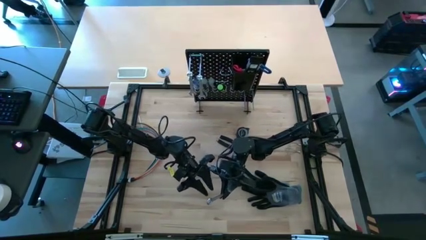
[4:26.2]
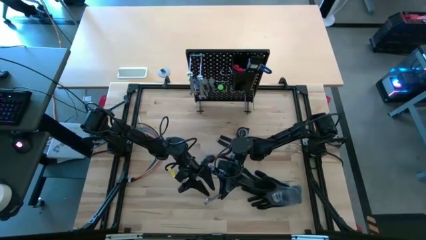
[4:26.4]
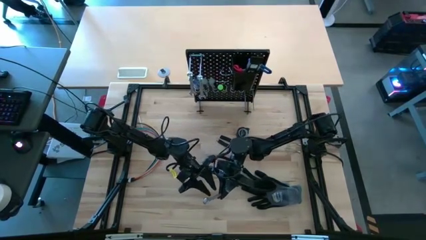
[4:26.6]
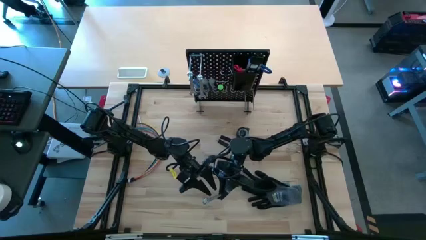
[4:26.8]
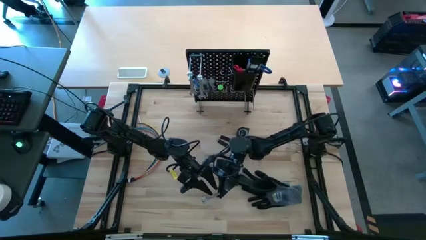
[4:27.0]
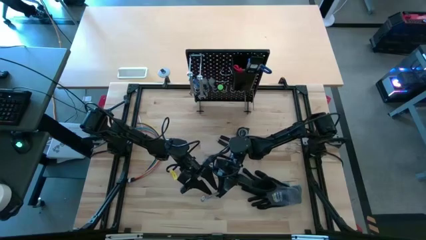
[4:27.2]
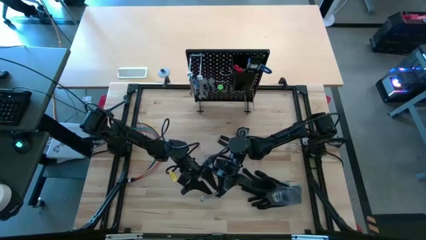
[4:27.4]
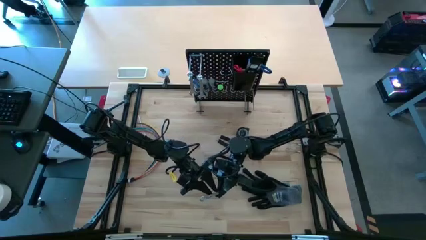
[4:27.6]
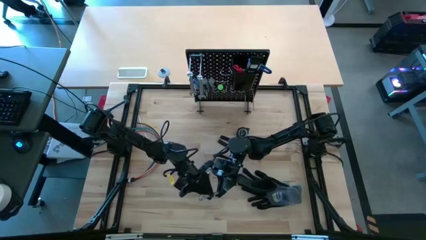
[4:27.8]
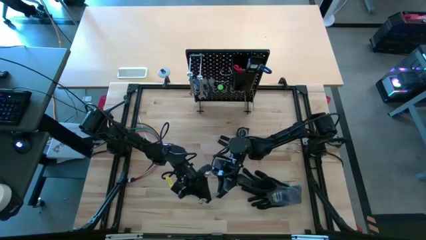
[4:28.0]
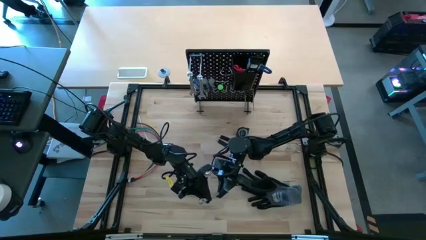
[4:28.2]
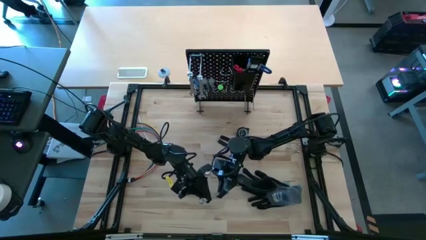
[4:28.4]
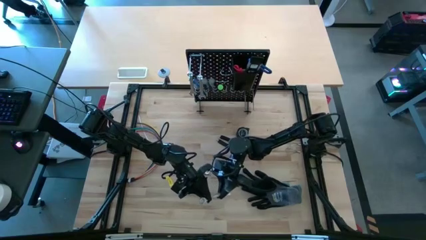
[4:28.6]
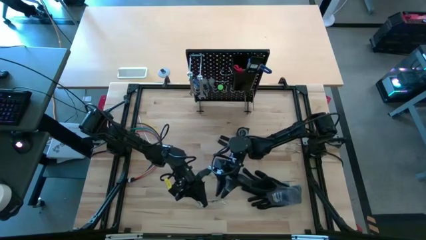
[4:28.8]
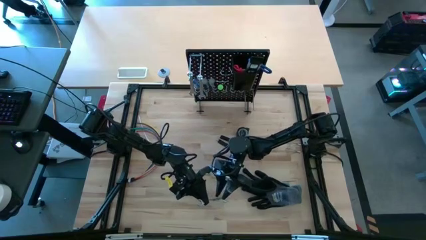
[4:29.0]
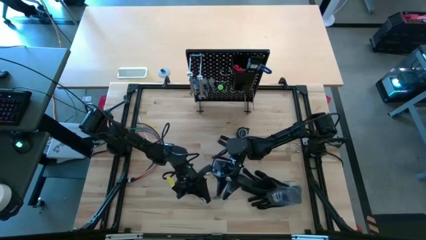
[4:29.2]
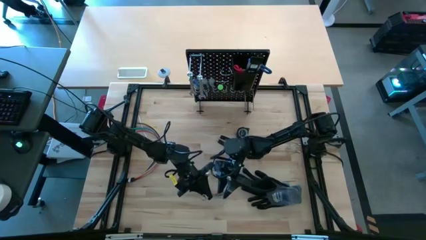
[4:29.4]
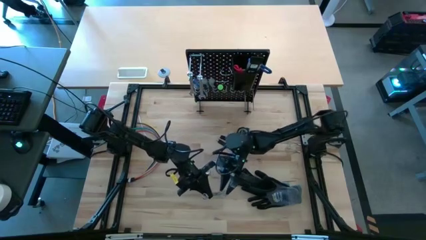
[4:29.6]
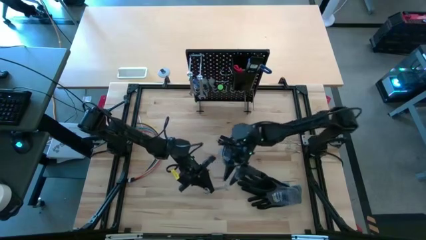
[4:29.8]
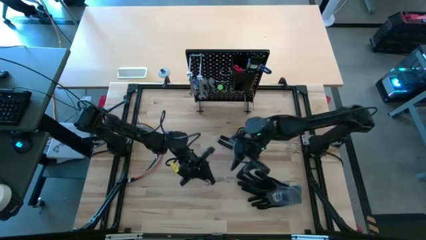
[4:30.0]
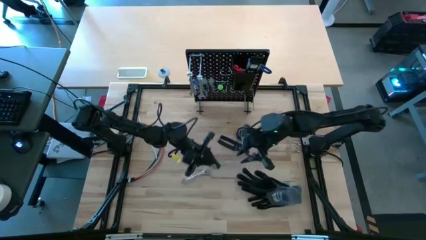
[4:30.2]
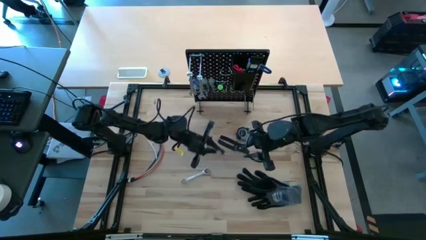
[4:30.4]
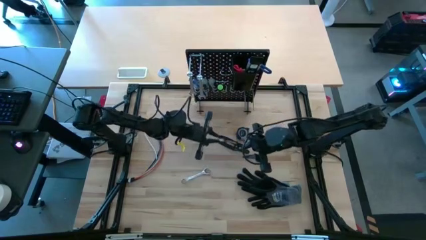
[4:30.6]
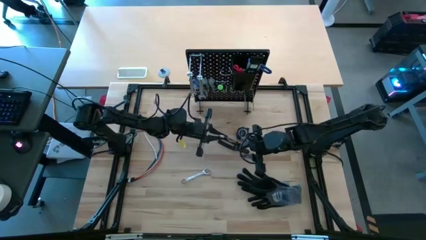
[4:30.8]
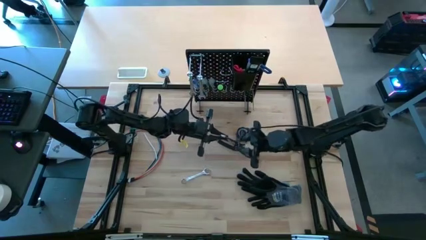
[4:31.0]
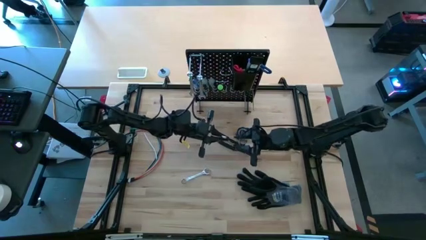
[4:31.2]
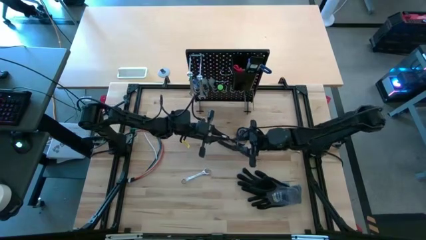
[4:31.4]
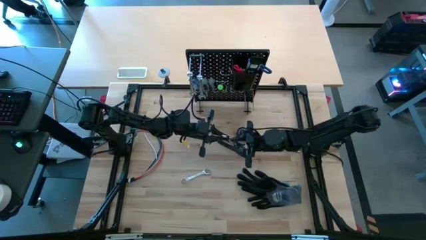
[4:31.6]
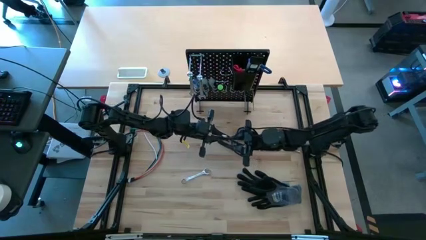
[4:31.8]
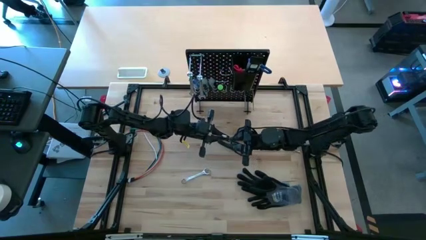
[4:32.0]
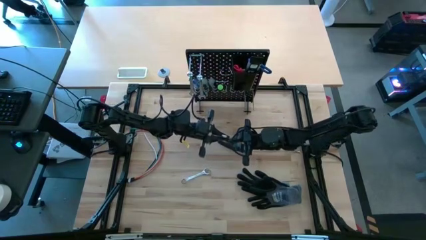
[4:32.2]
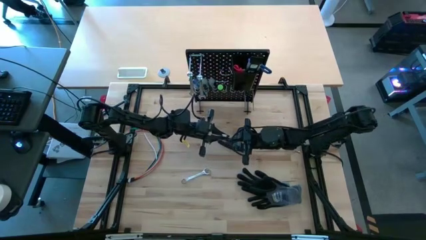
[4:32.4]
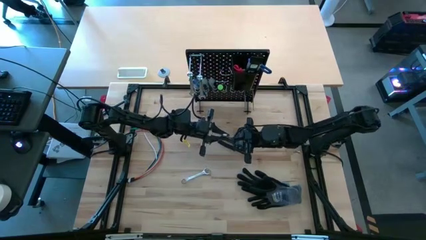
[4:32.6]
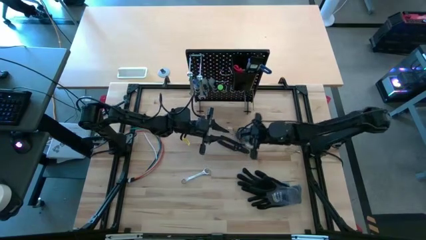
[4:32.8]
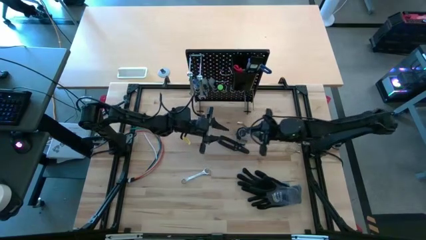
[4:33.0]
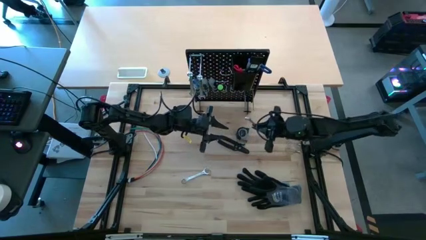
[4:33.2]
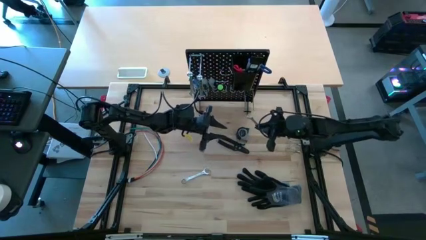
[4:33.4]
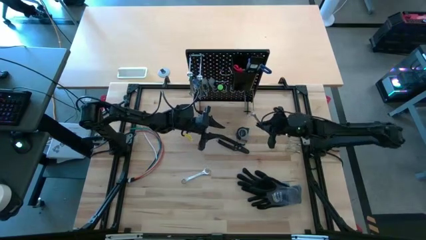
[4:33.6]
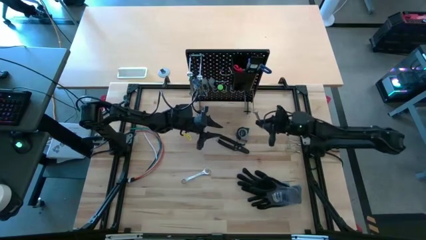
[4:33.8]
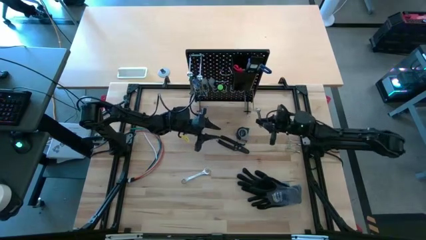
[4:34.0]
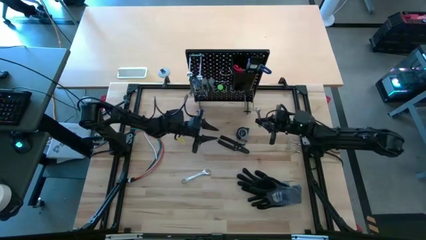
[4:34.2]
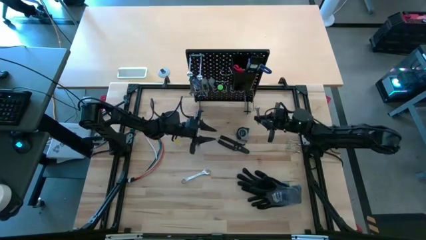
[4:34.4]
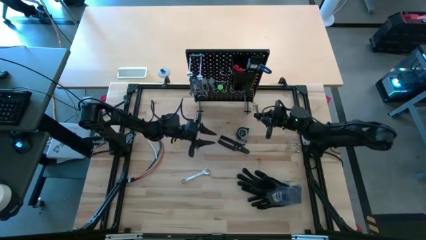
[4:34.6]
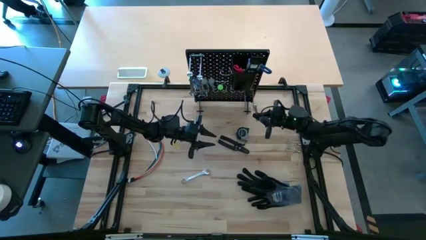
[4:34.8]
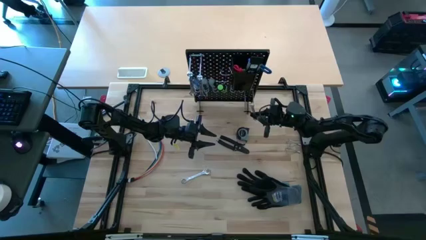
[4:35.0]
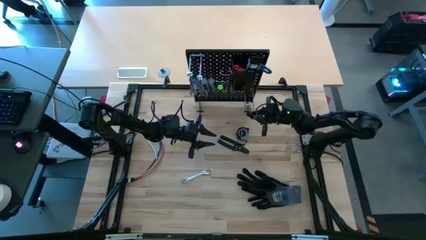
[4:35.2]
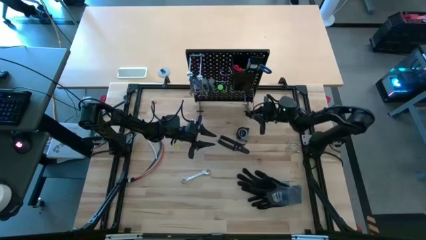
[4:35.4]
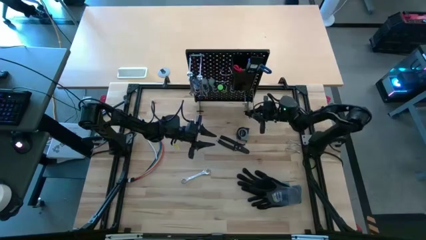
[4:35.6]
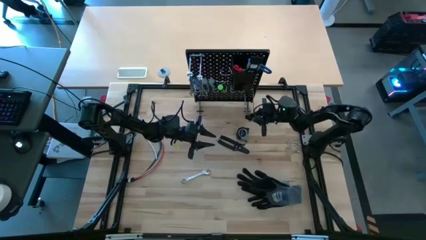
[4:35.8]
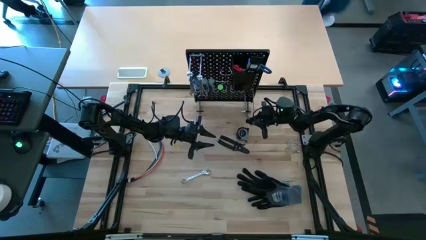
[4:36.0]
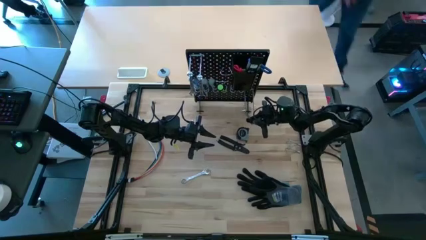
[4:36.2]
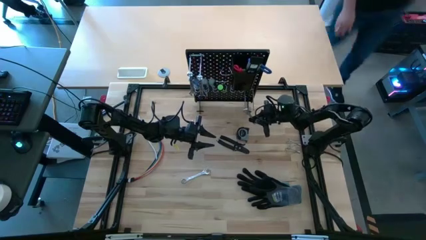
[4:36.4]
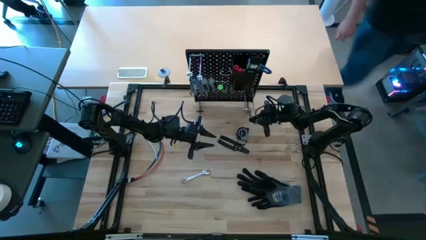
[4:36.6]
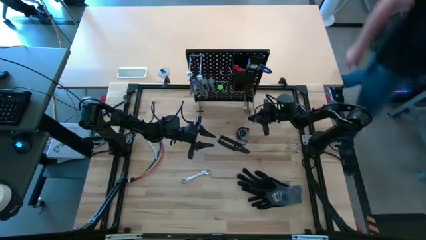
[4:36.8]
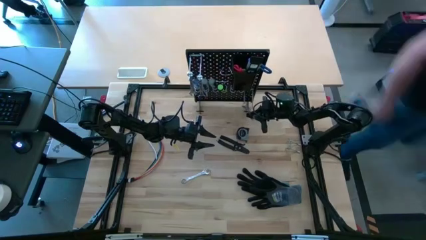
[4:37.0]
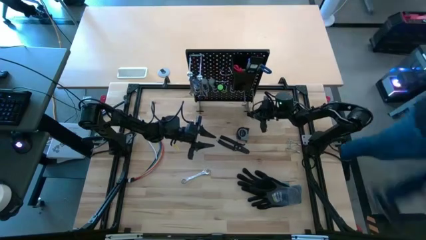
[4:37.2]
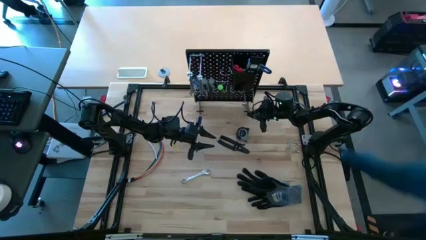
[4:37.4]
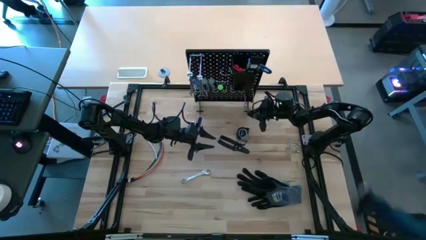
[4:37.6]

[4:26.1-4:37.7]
Task: Hang tools onto peg board
Hang the wrench on the peg board
